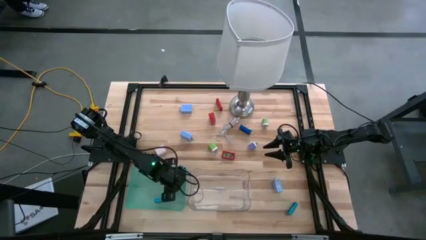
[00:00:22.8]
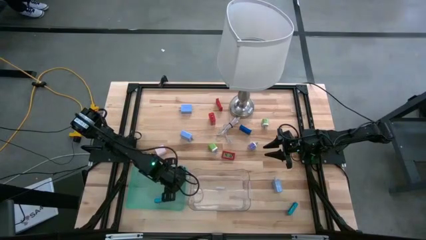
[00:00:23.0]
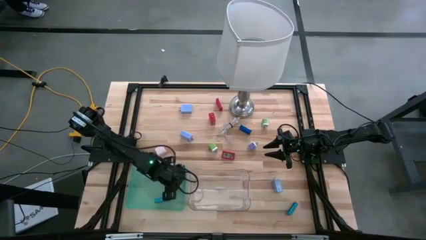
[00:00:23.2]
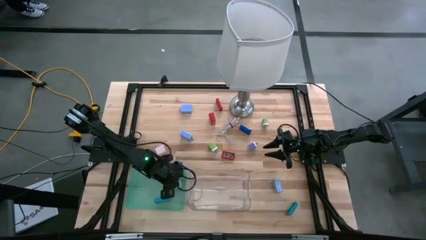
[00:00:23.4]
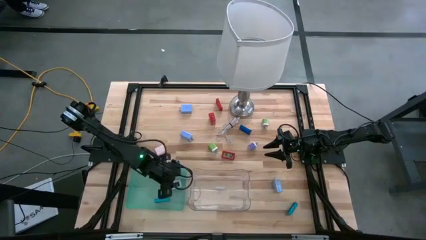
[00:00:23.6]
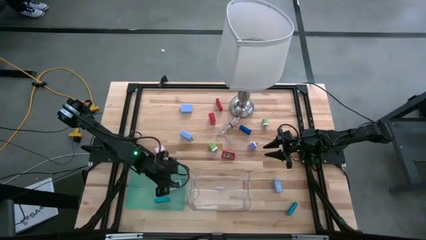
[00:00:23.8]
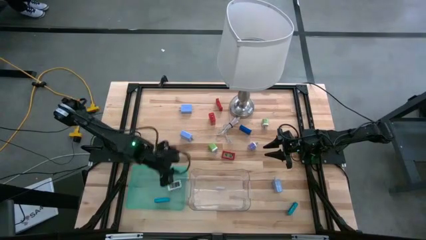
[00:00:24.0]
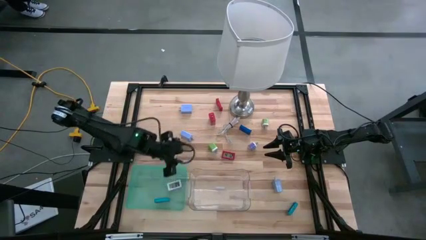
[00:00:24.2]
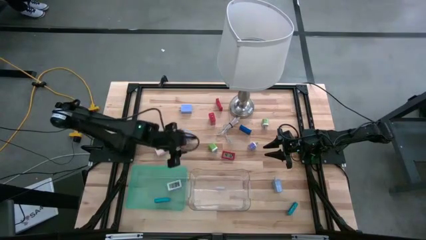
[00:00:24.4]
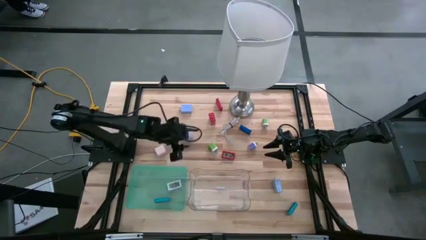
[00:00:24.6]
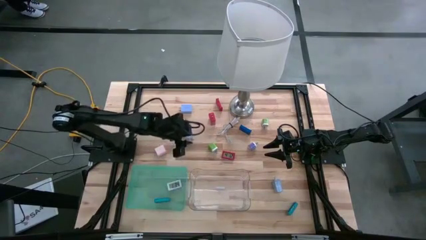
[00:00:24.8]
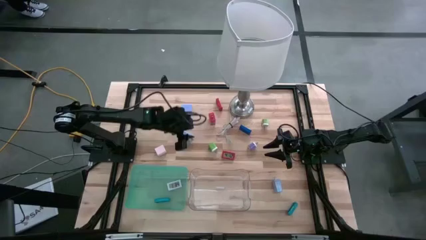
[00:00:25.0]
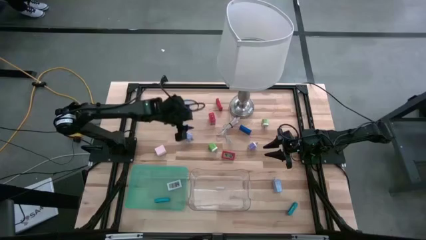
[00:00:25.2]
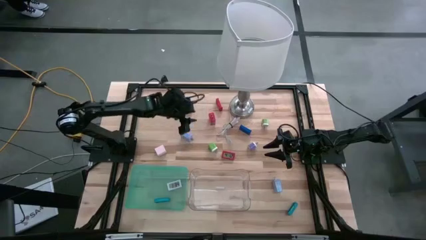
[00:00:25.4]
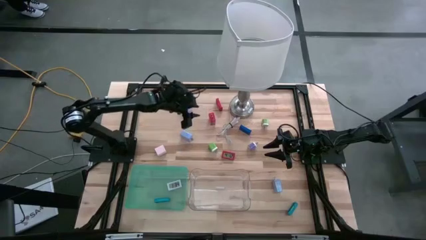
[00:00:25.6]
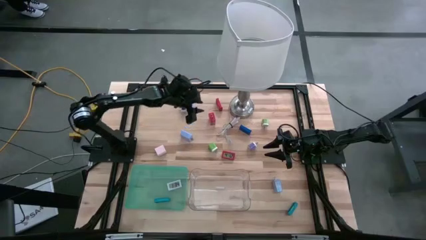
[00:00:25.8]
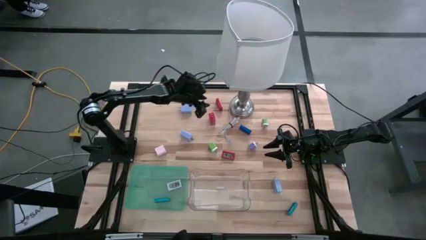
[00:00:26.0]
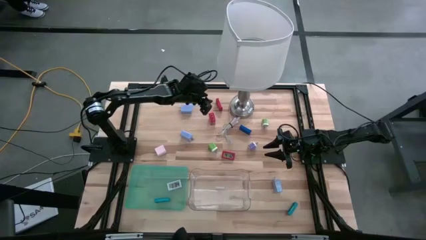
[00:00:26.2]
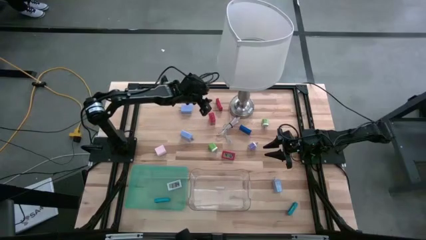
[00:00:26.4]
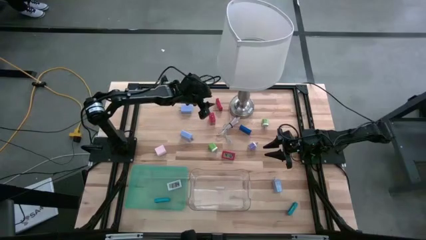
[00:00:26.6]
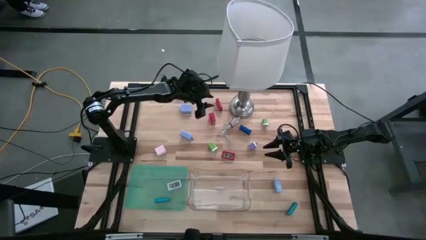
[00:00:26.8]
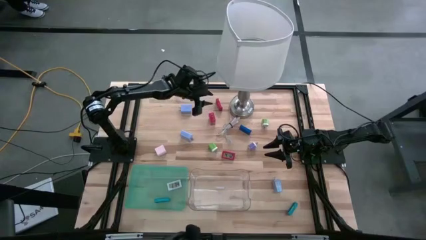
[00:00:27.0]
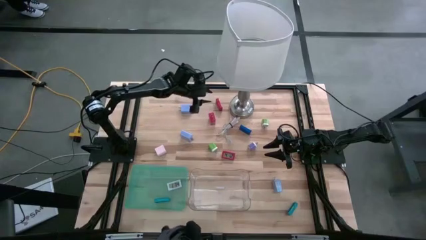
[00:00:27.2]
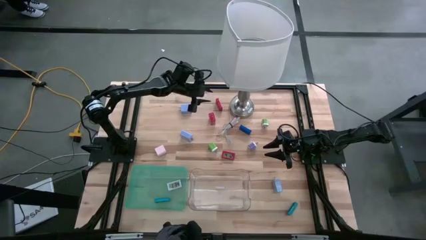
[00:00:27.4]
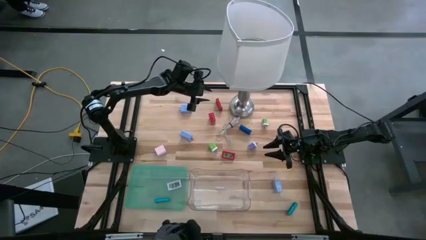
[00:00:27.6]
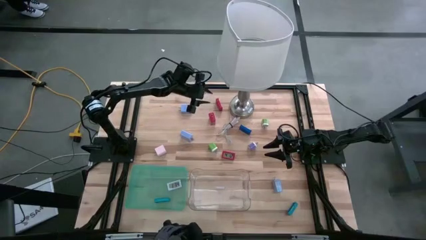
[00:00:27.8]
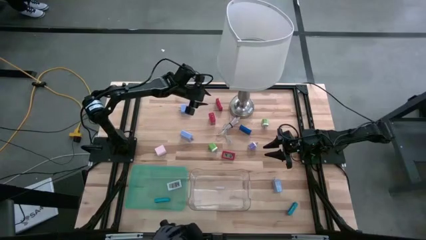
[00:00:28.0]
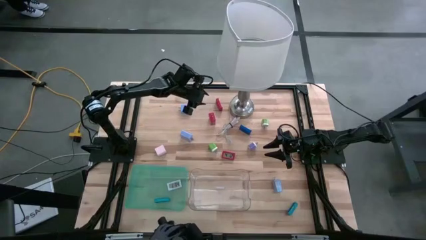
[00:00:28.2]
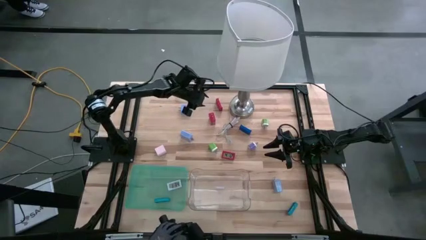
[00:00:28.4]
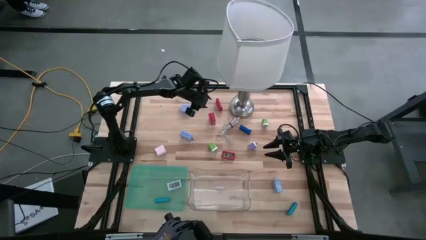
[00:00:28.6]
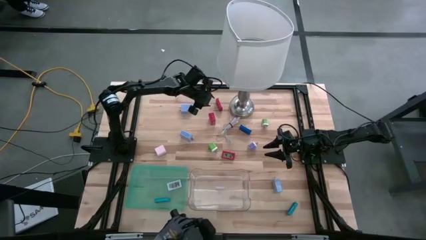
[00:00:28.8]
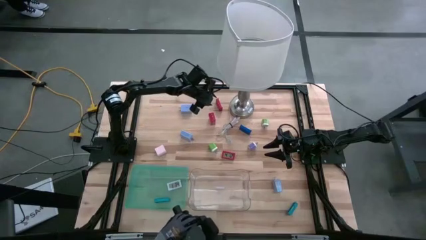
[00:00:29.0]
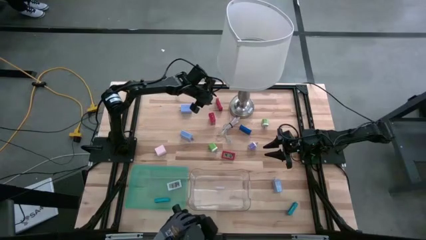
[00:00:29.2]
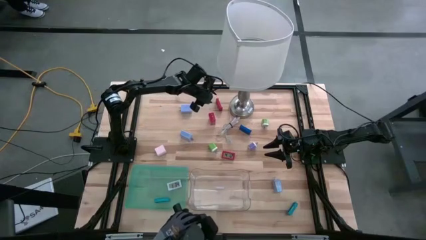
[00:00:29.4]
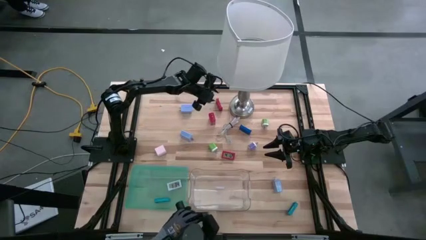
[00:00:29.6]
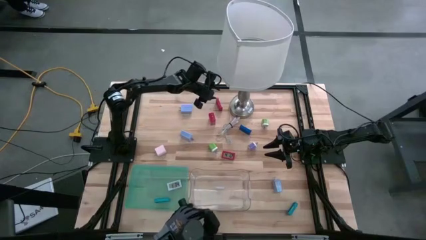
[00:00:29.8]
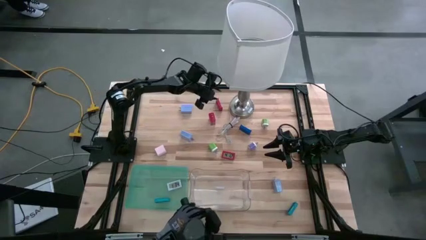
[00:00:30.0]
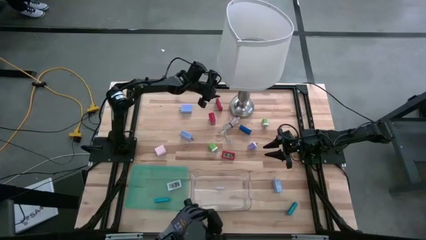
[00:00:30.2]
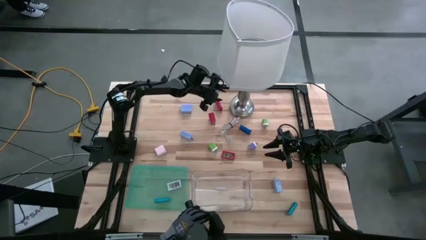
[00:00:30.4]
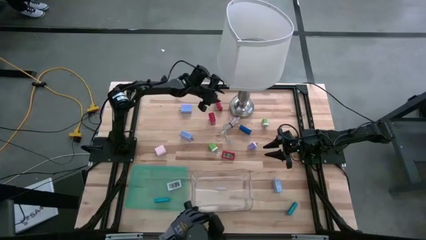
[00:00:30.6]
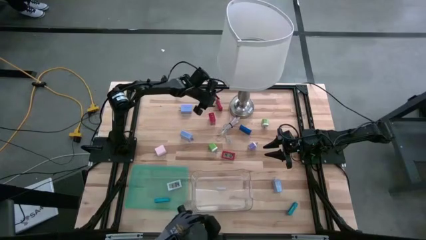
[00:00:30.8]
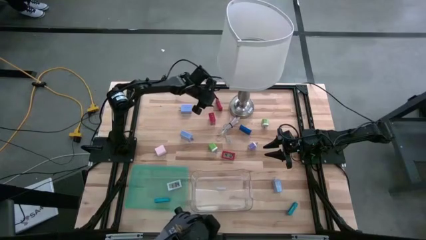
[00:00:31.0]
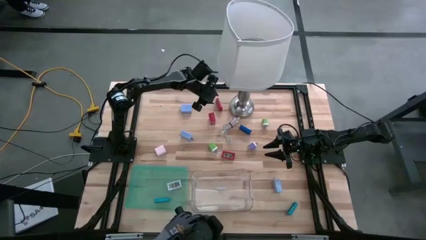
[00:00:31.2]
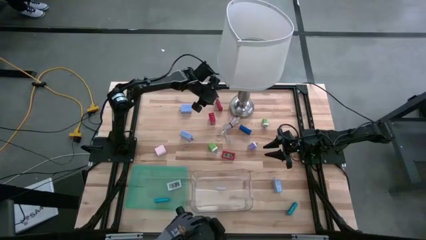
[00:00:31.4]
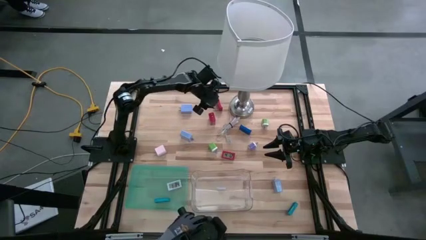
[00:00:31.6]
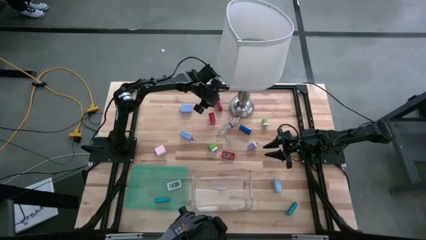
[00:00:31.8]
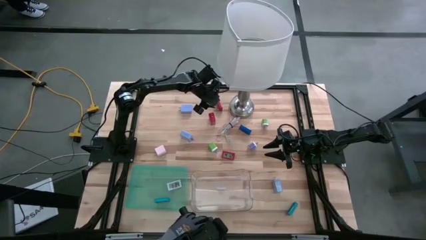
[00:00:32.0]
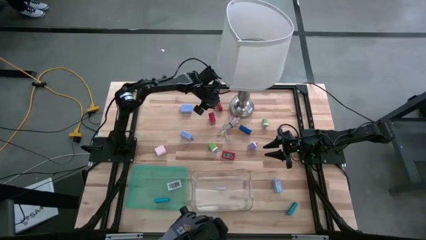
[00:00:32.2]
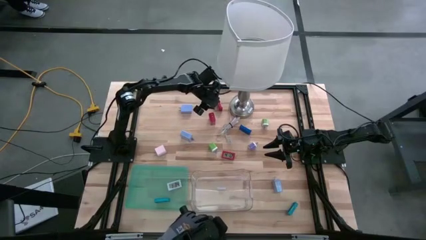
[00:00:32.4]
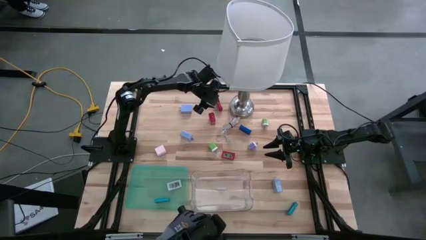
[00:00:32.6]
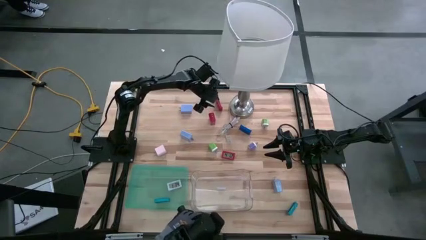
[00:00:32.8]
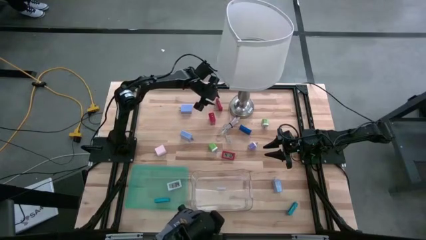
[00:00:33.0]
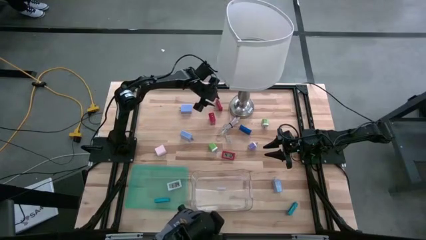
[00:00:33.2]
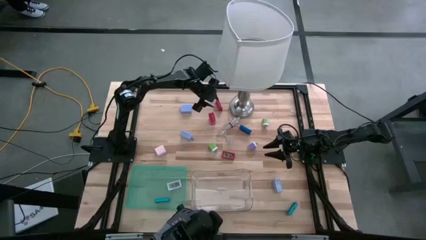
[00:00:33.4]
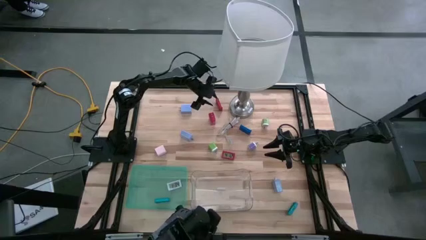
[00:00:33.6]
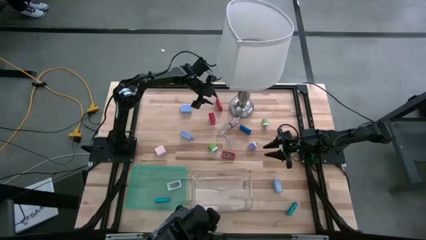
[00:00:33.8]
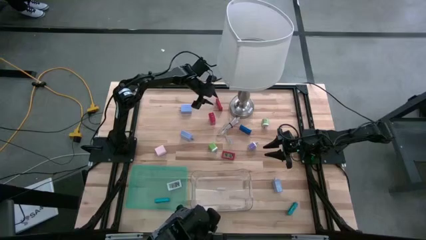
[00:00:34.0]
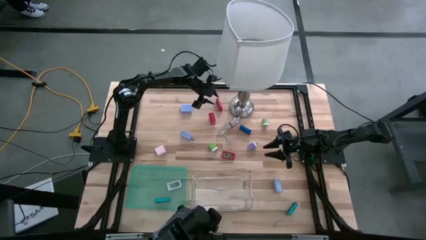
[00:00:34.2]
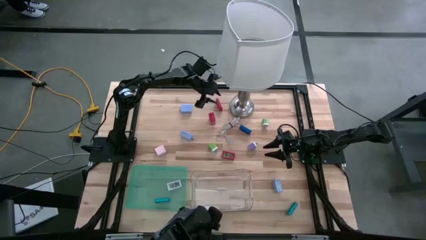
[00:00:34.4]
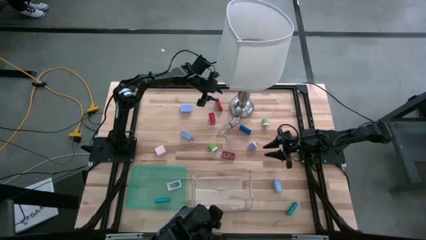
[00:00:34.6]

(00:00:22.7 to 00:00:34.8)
Task: Pick & Place Office items
Put the top red timer into the green bin

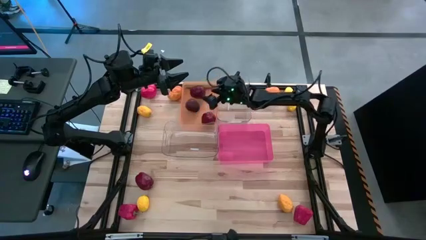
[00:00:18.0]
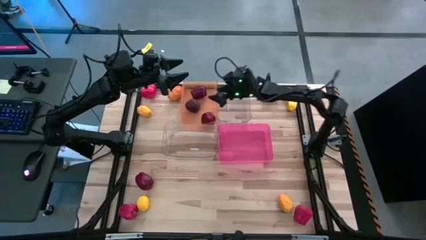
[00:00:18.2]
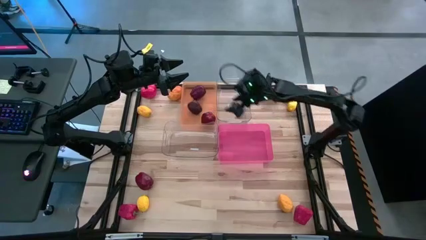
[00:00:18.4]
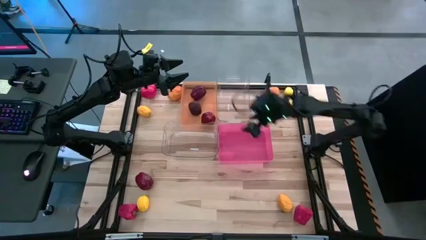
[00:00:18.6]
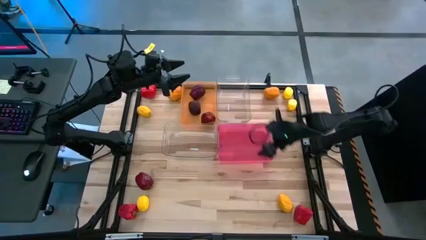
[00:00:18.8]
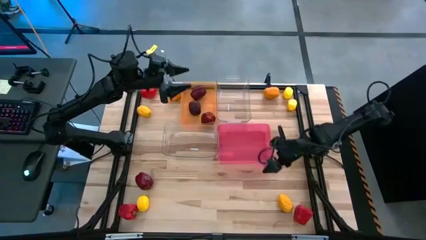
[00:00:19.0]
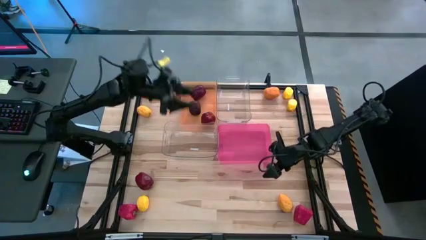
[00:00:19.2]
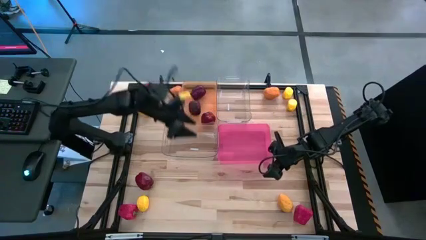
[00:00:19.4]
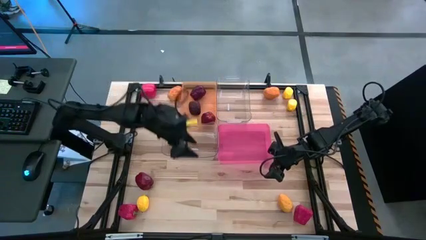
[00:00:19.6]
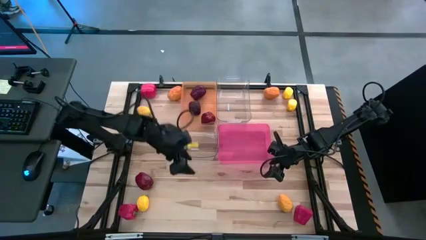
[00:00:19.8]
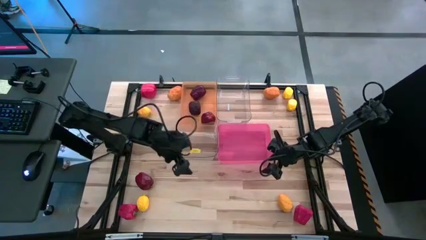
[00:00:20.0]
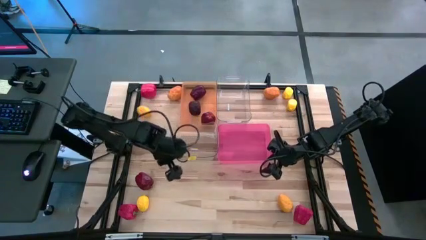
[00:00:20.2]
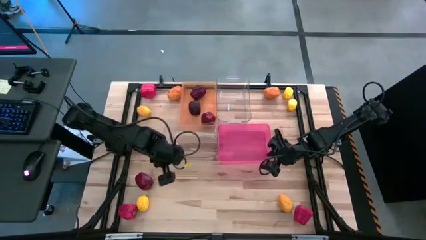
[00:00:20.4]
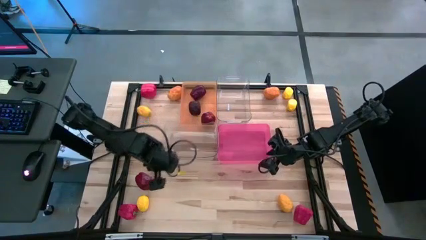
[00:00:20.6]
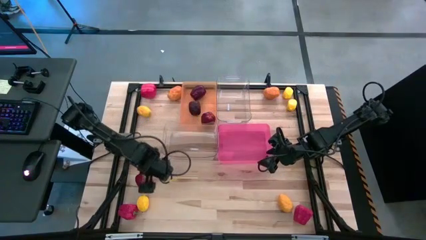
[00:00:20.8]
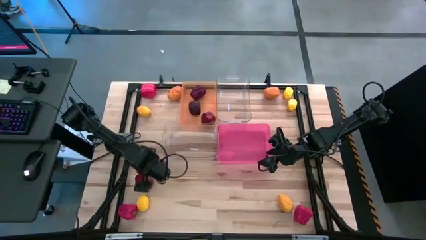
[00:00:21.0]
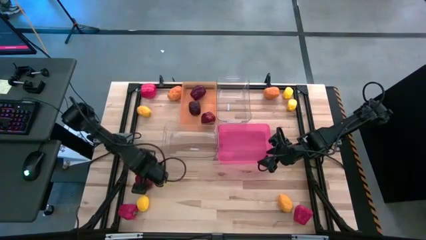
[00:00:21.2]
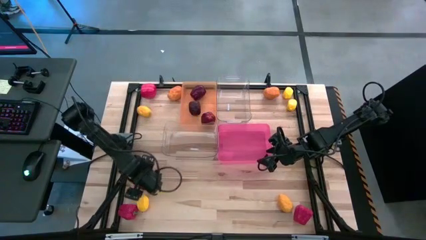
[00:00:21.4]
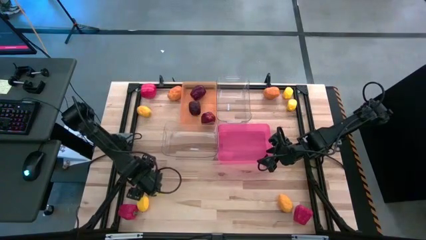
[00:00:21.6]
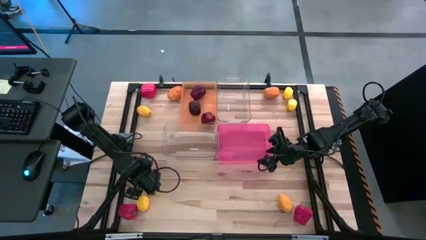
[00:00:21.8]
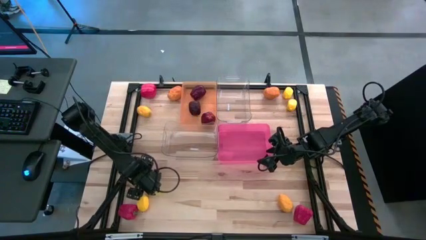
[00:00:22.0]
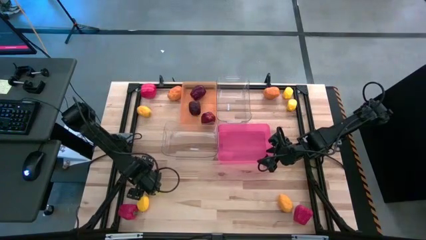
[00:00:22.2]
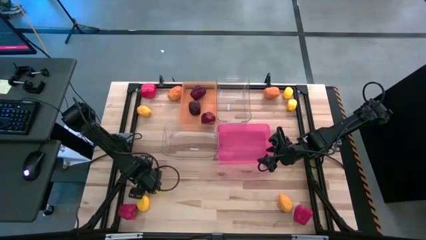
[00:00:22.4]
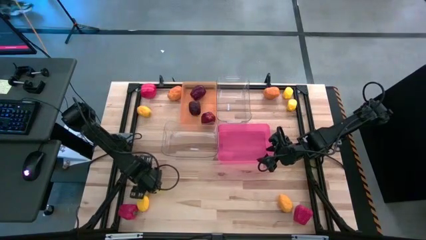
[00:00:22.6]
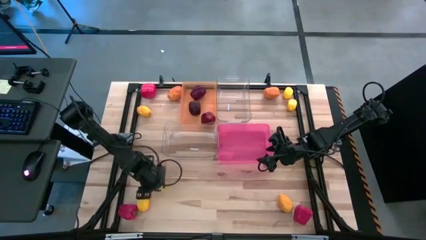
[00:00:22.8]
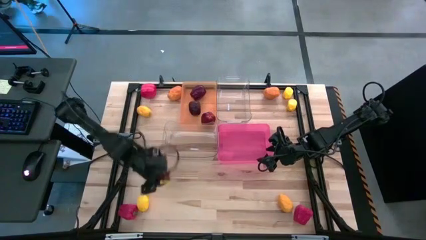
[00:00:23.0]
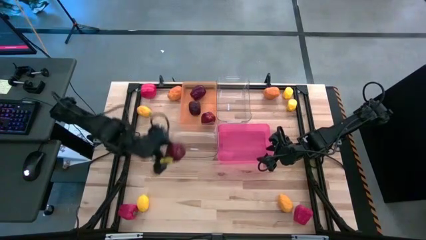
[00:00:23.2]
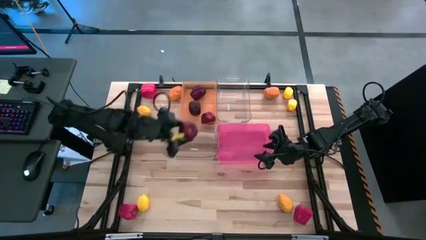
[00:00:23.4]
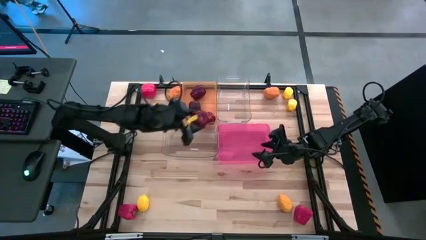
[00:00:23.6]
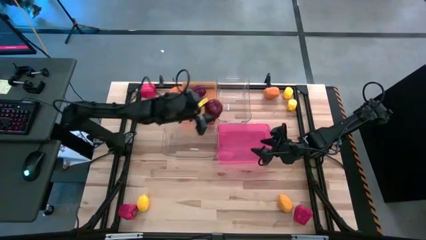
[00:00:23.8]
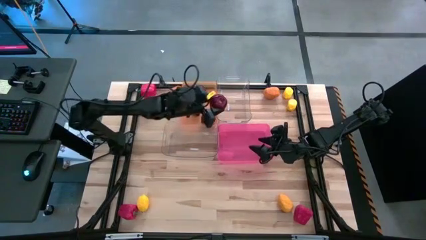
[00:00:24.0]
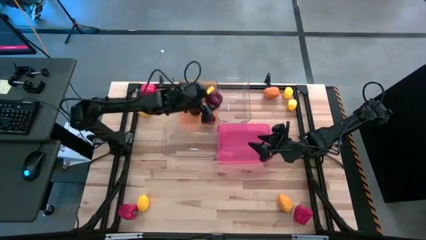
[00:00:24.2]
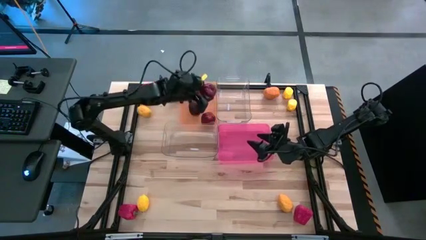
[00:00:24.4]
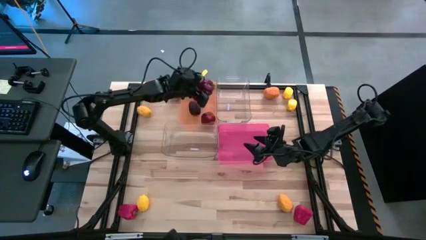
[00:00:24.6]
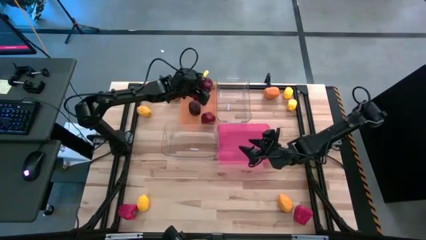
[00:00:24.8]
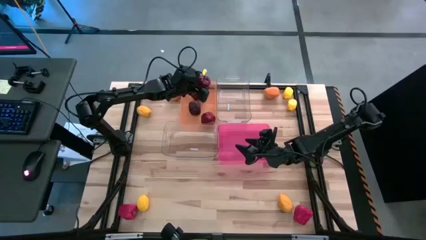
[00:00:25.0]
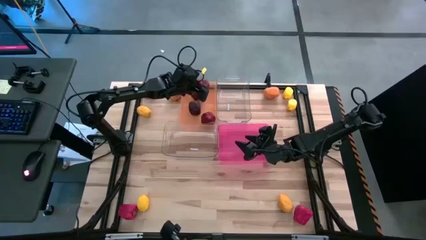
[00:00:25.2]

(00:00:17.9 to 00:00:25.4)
Task: Sort produce into baskets
Put the red apple into the orange bin
